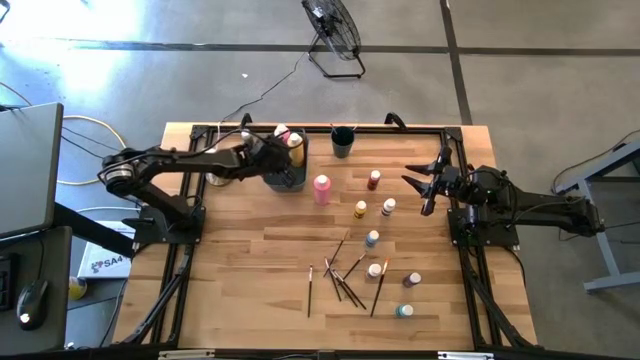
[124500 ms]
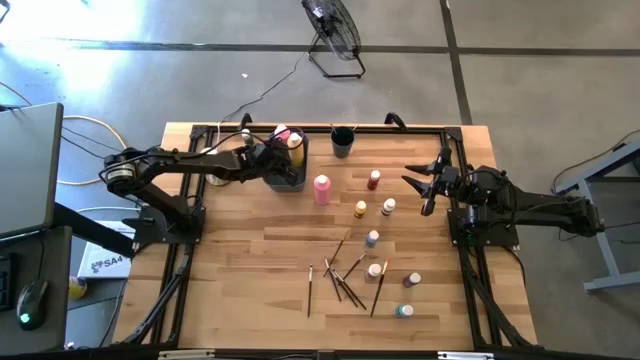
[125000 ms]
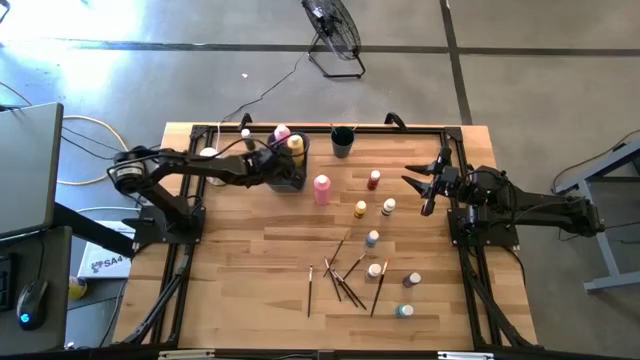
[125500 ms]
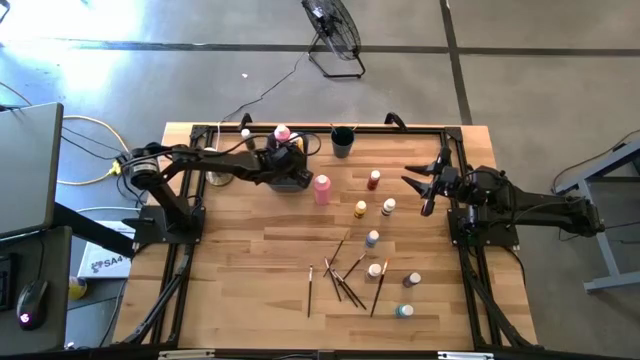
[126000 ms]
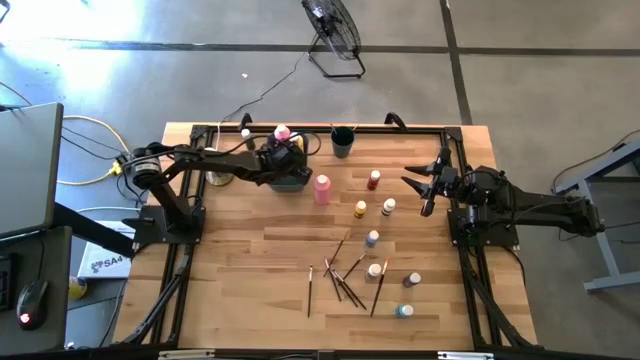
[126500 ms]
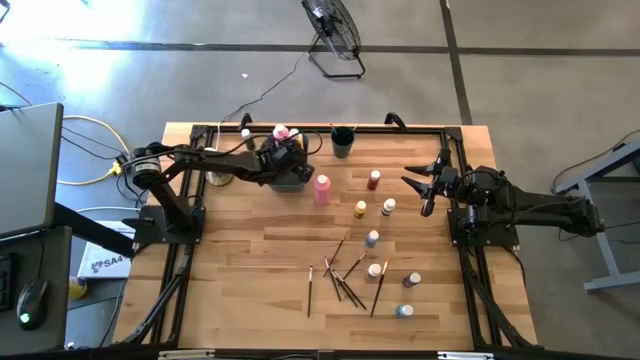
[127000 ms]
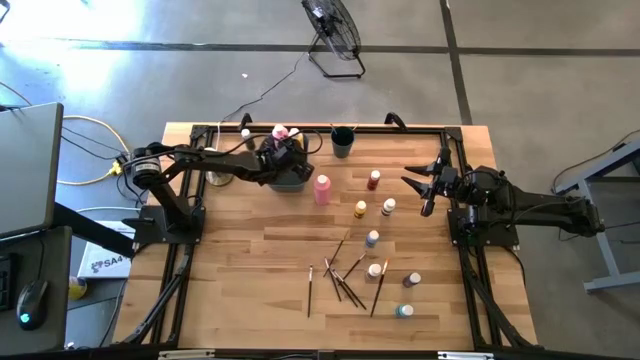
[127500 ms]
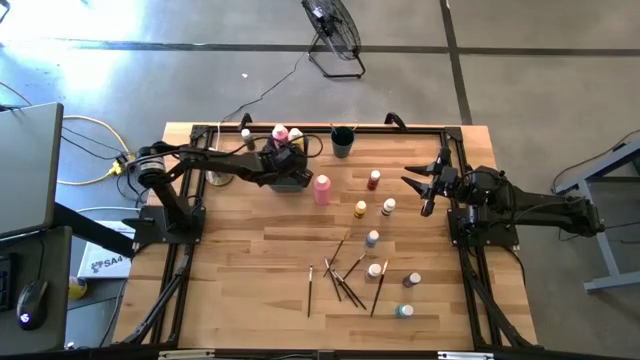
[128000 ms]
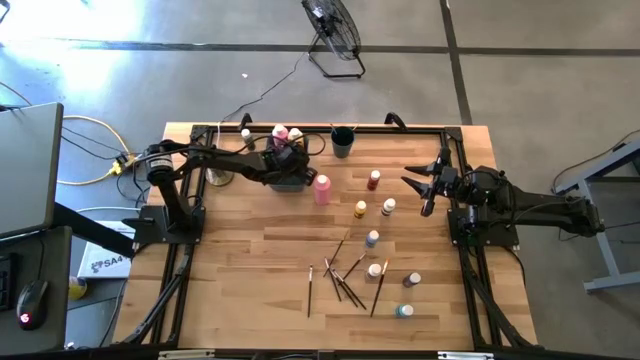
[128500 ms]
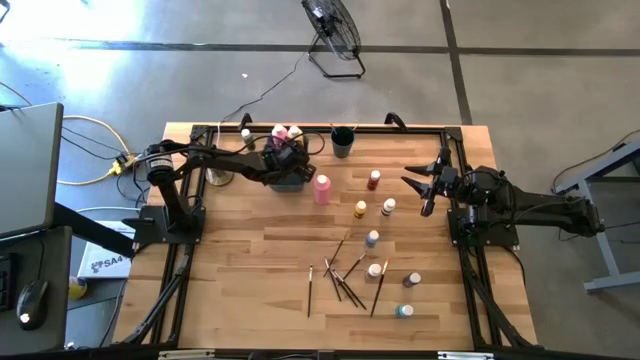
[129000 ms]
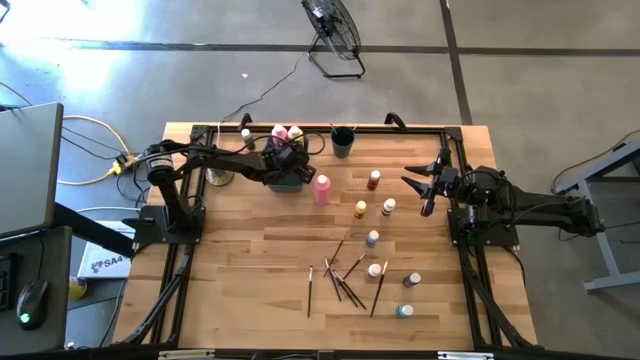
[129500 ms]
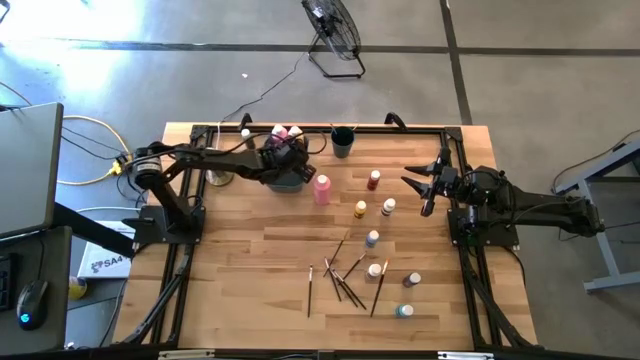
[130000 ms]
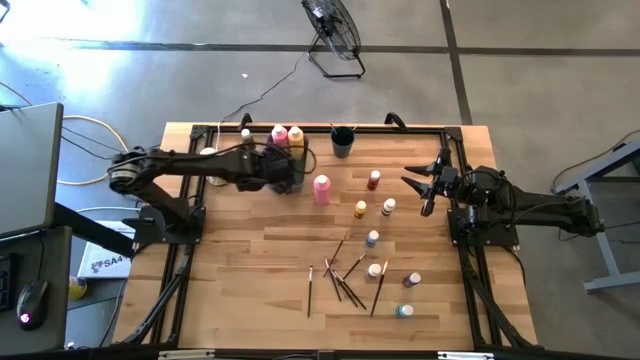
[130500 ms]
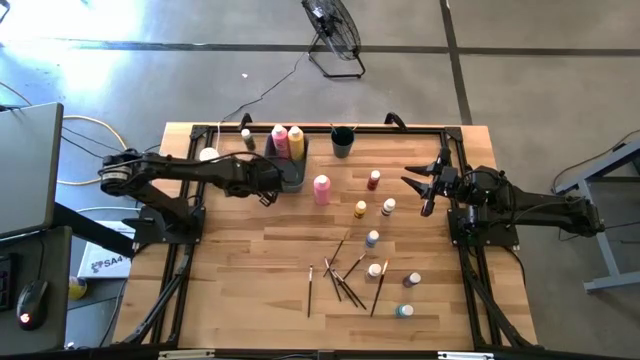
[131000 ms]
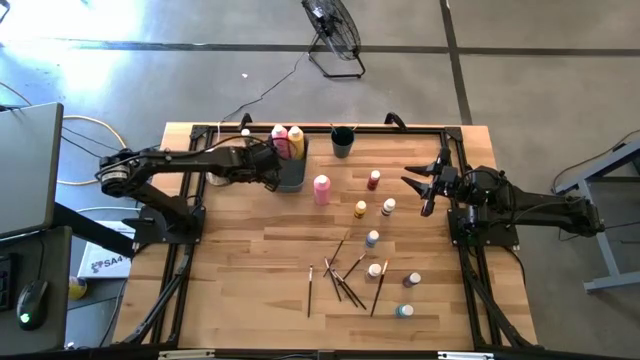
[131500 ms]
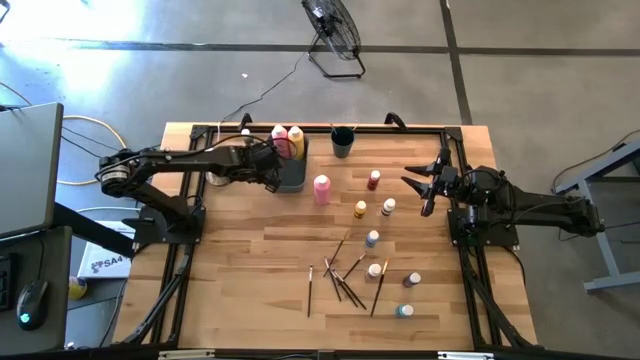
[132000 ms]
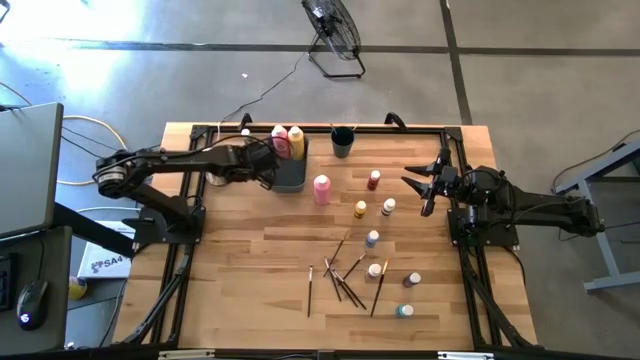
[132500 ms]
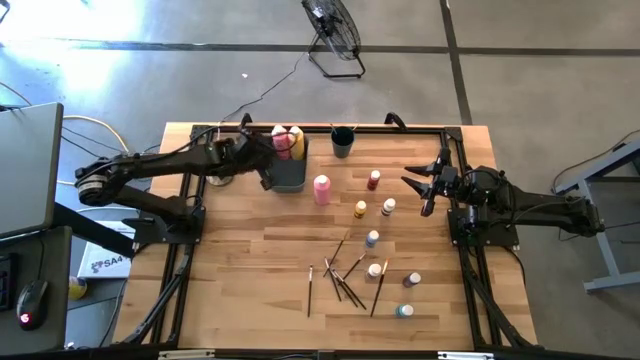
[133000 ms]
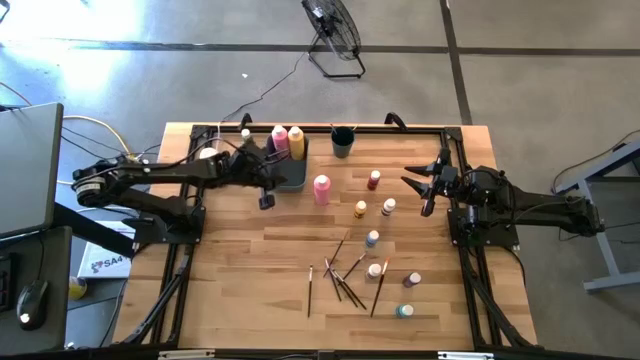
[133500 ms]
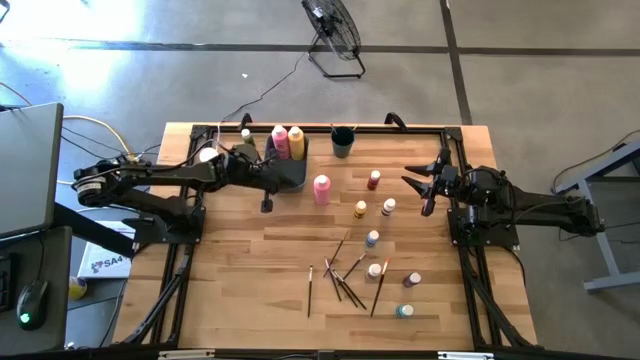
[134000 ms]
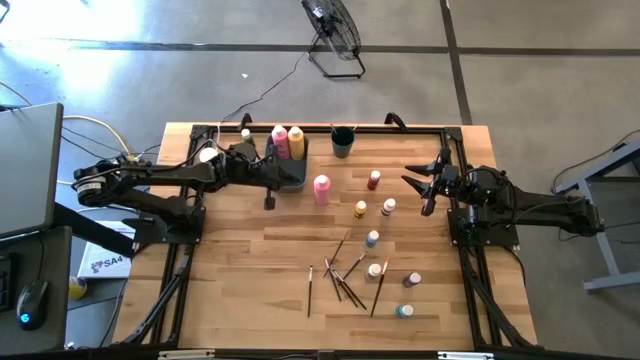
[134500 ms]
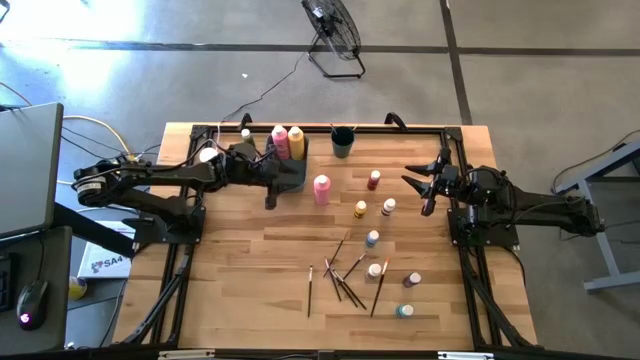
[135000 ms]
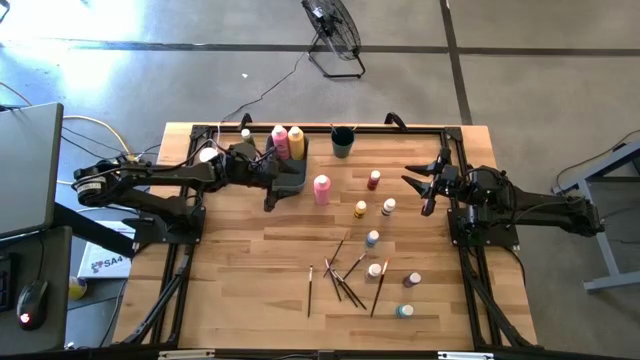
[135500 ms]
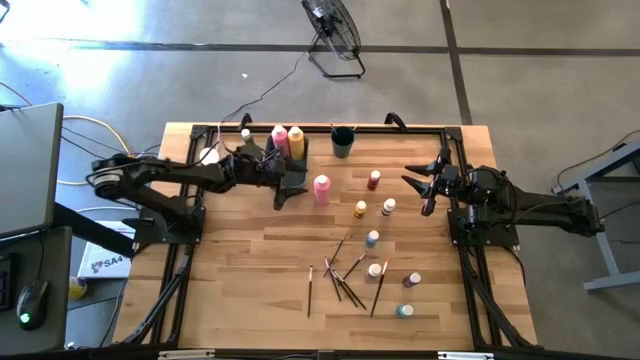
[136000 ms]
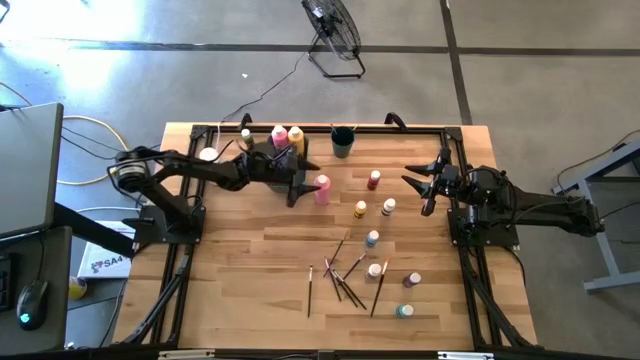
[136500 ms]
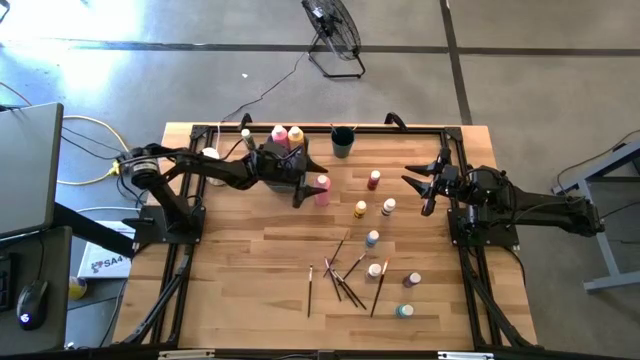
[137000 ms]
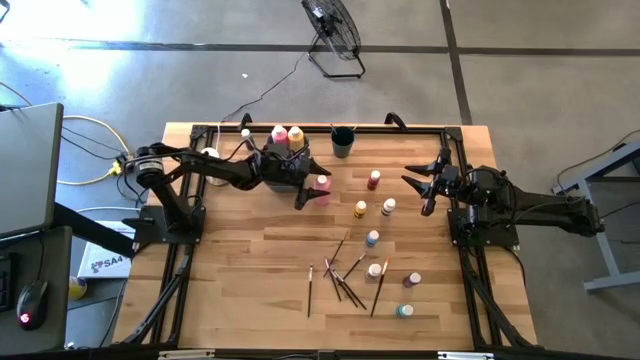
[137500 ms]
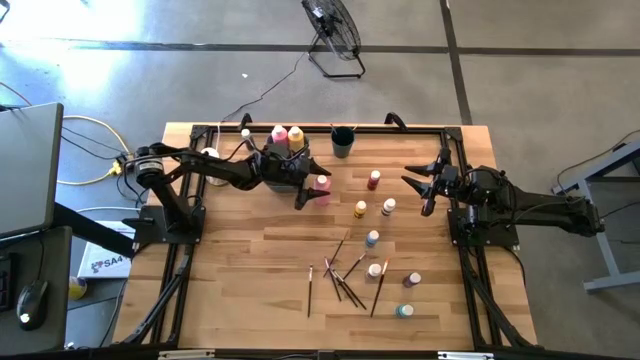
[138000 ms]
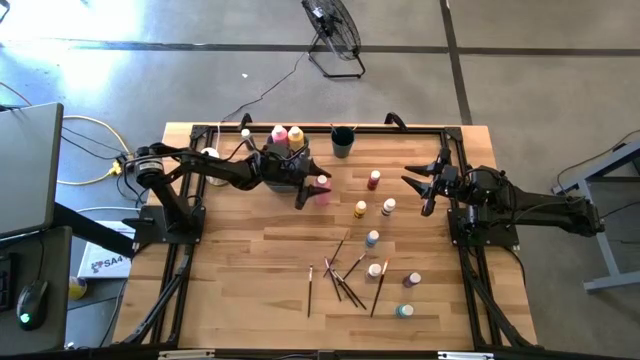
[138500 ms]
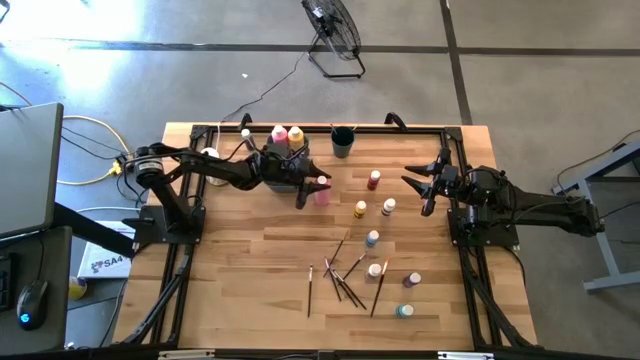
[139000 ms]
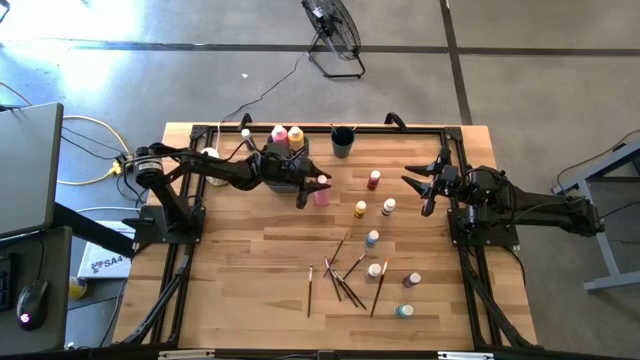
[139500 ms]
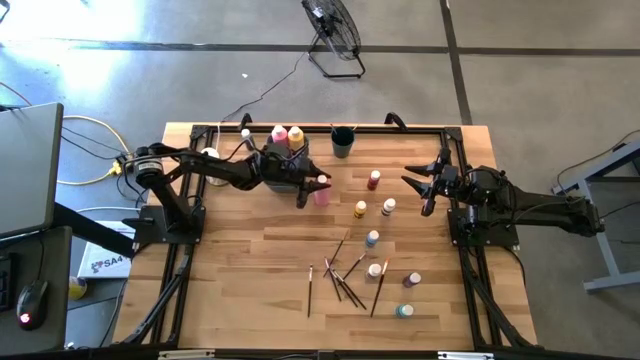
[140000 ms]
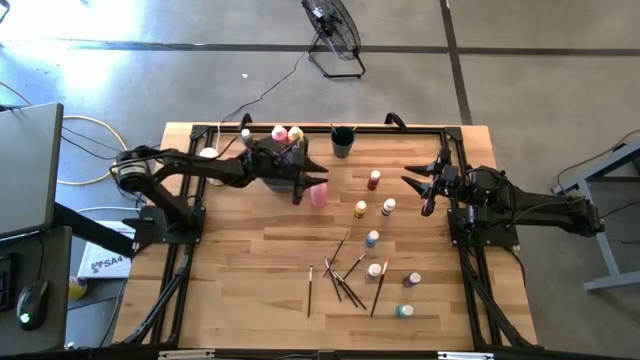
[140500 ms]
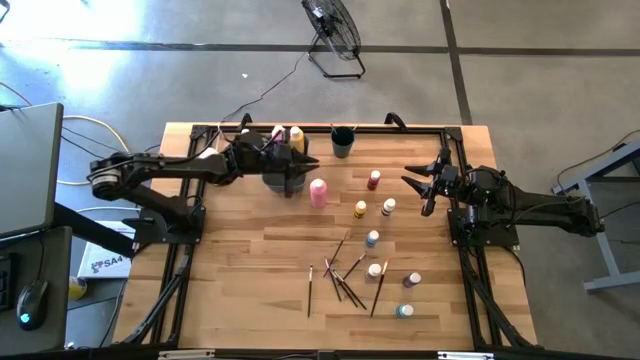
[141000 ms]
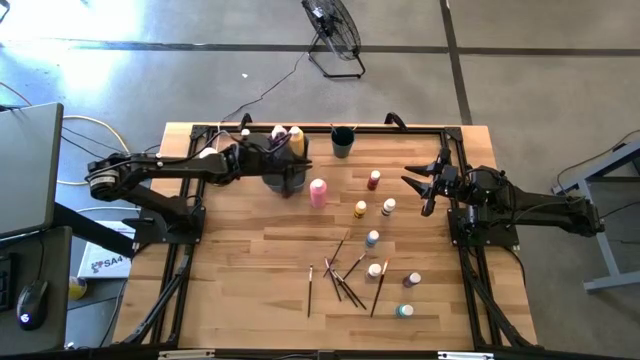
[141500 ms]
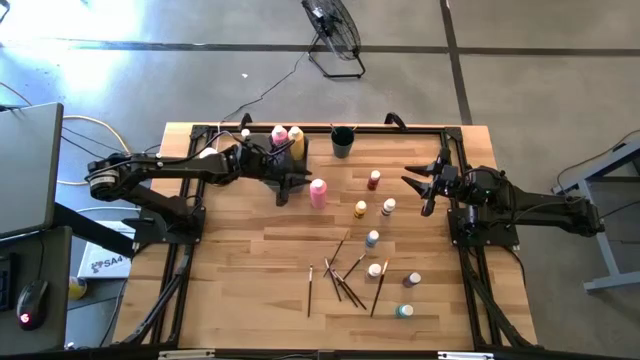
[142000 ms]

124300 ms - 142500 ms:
Task: Pick & Place Paint Supplies
Put the large pink paint bottle into the green bin
